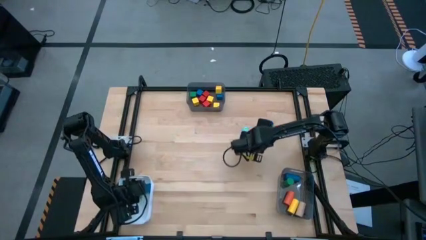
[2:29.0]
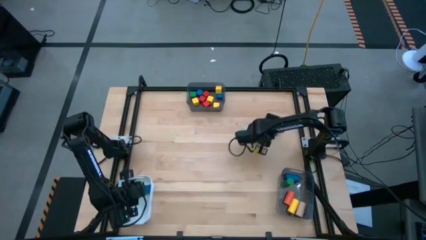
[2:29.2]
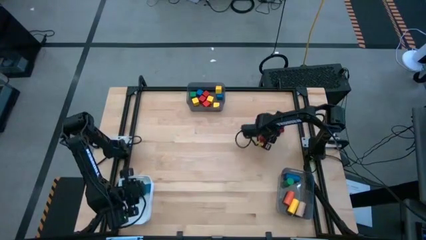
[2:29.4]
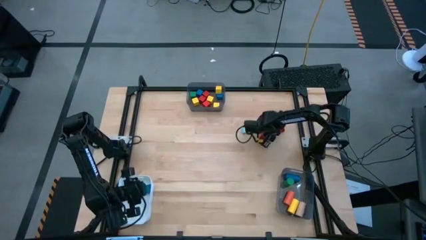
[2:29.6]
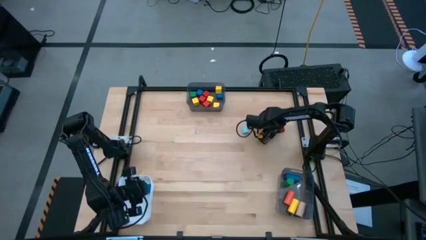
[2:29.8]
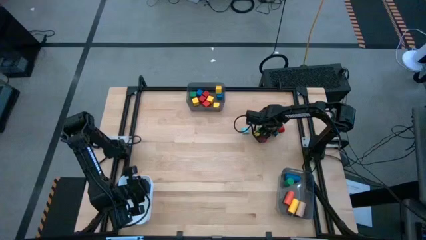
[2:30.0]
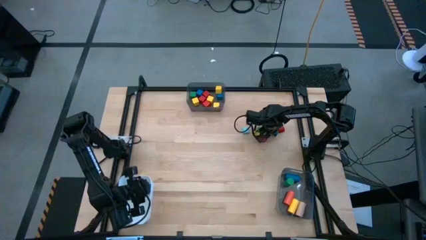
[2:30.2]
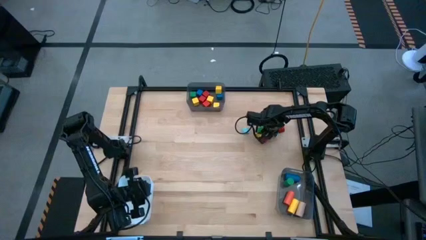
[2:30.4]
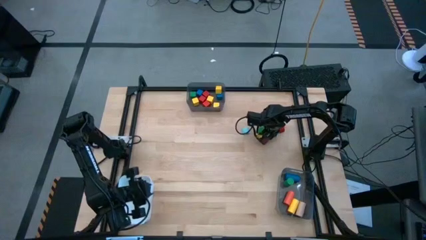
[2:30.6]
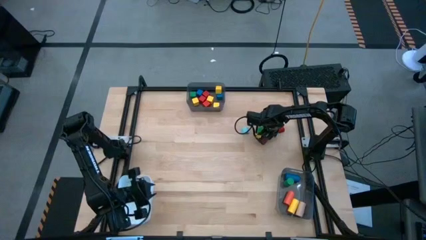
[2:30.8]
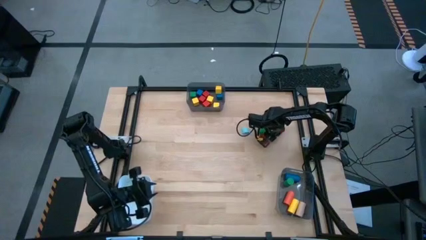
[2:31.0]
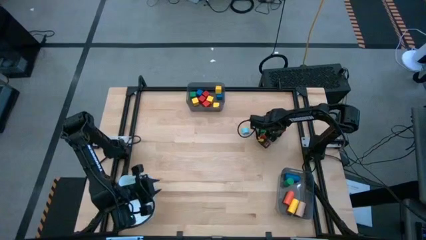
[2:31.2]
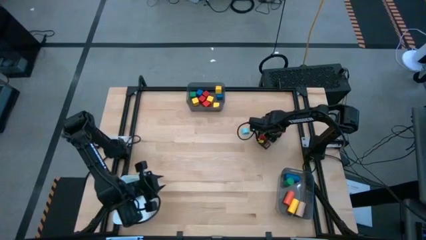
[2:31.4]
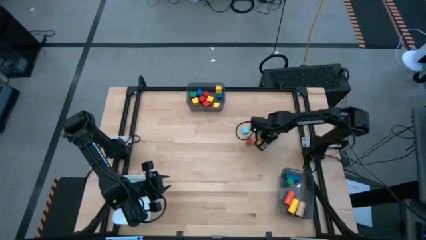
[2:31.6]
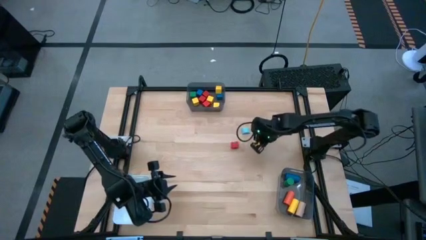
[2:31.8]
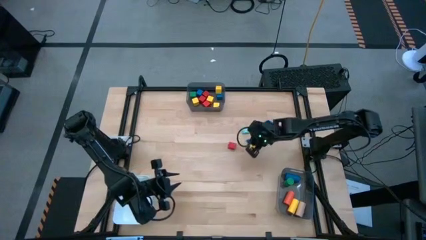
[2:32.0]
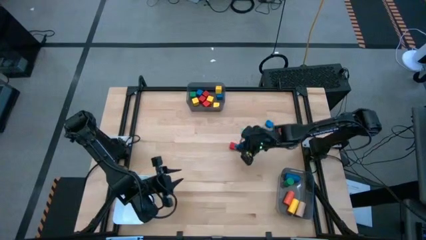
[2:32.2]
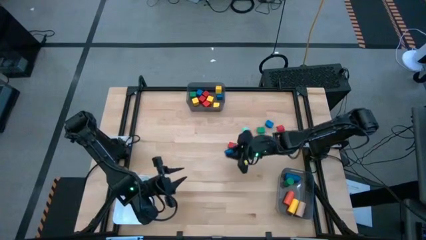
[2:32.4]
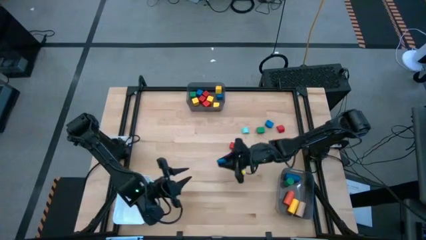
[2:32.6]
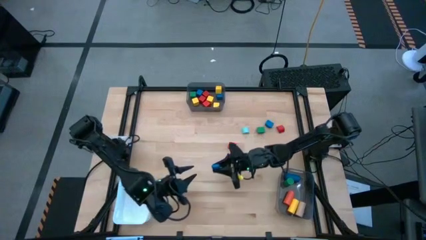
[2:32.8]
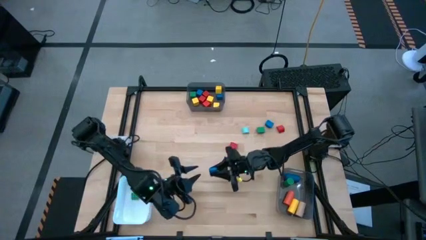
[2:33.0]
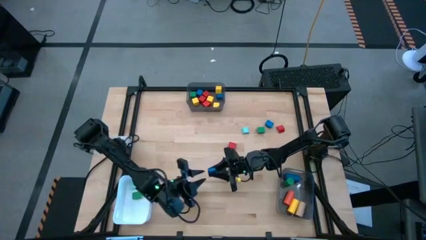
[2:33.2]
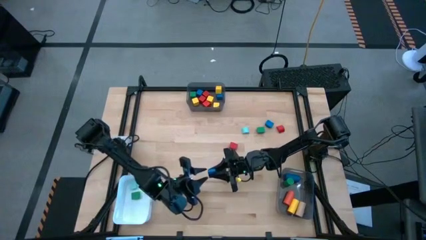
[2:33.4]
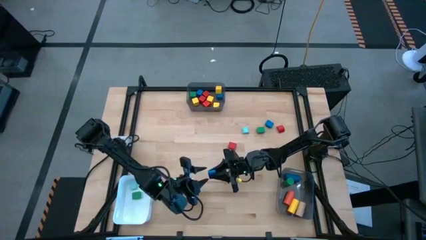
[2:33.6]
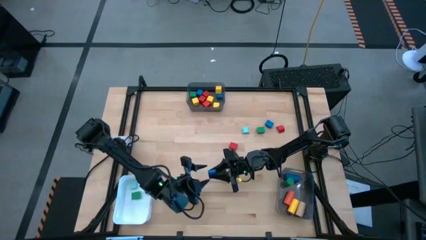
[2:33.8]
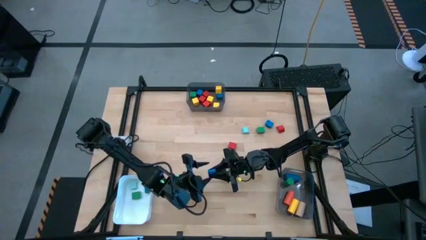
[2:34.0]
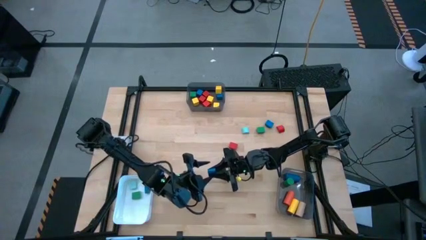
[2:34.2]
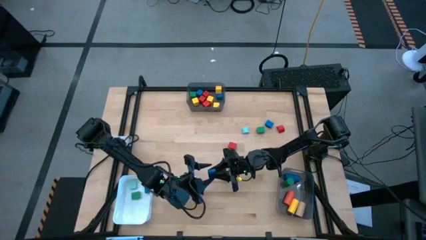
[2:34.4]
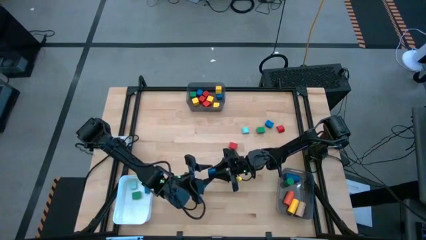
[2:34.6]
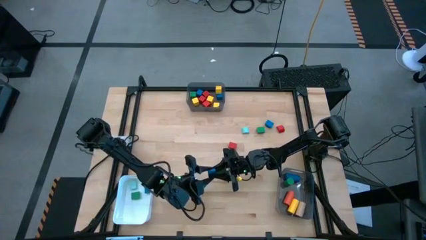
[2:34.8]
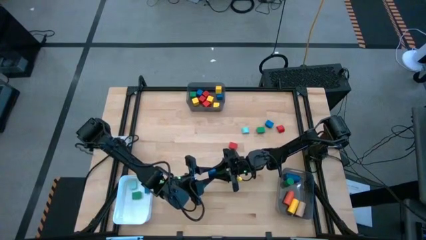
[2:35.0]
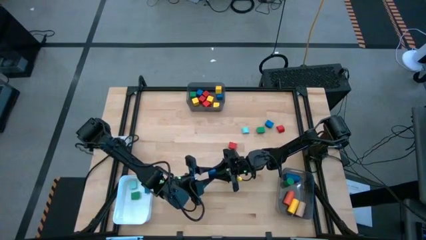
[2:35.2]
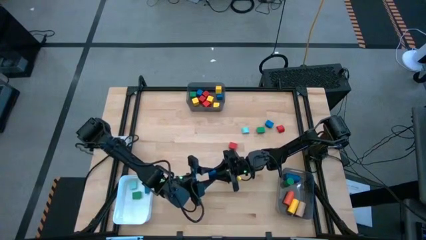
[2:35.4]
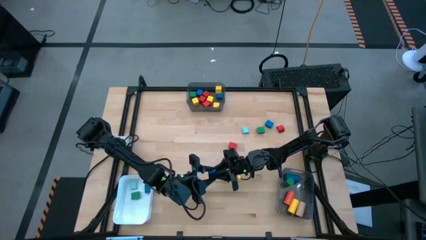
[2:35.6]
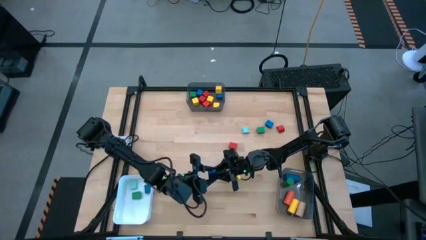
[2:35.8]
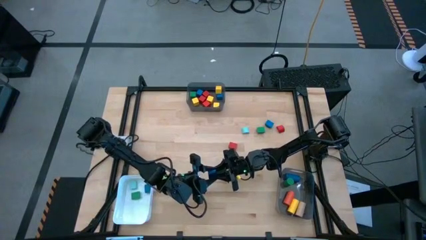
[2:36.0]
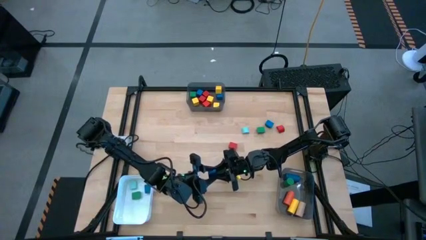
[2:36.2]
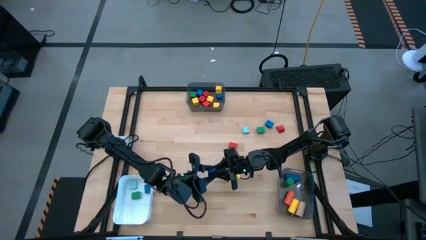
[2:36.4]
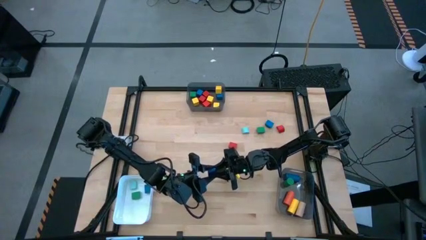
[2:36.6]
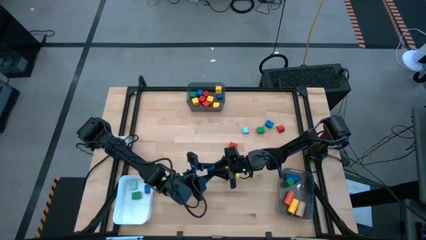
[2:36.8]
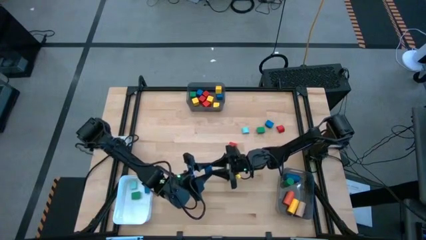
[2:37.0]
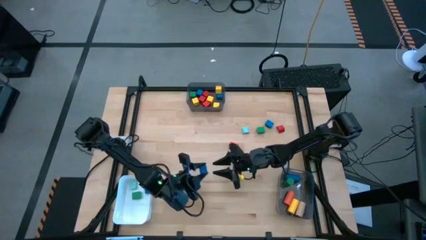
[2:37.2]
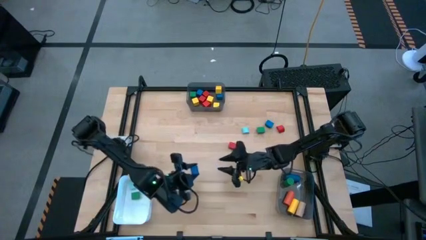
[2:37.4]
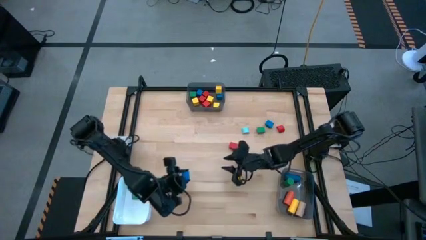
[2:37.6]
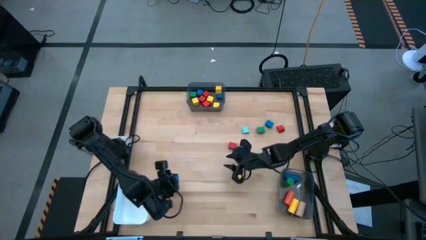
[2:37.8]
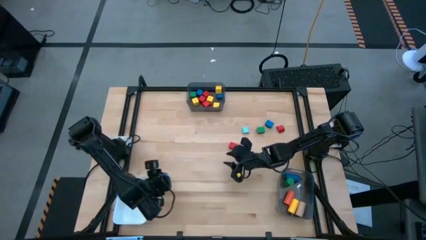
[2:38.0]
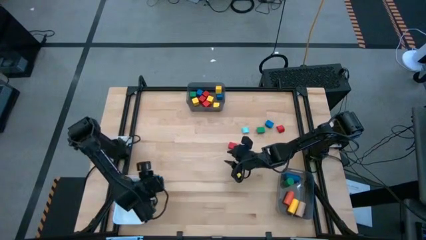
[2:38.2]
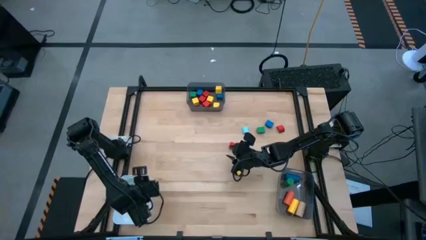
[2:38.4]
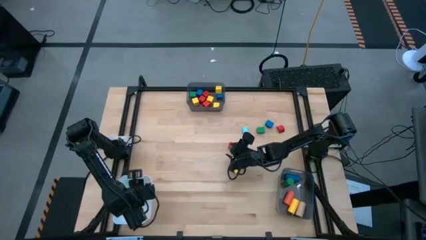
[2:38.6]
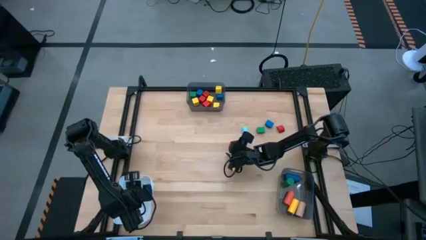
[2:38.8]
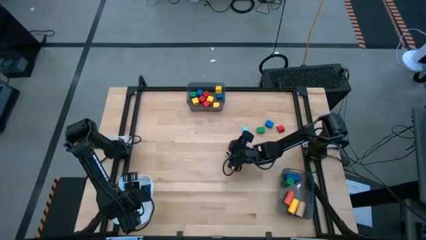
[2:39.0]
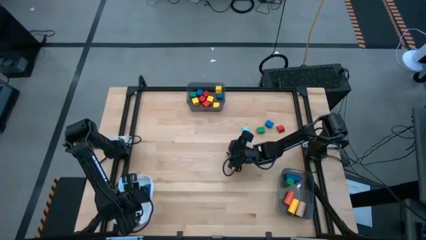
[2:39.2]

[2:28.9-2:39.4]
Task: Sort blocks by size
Put the blue half circle block into the white bin

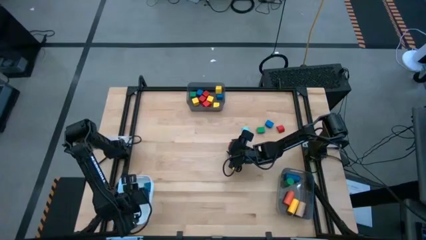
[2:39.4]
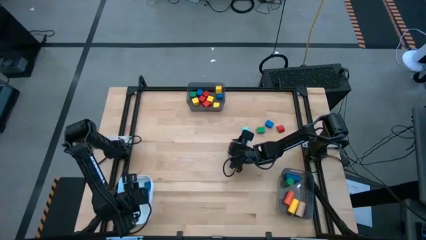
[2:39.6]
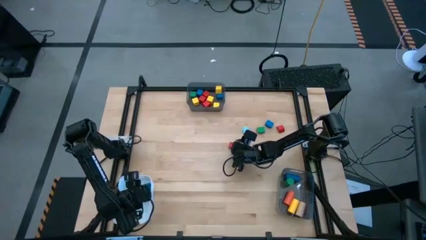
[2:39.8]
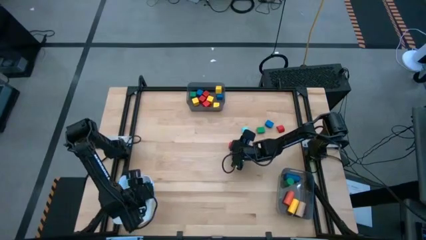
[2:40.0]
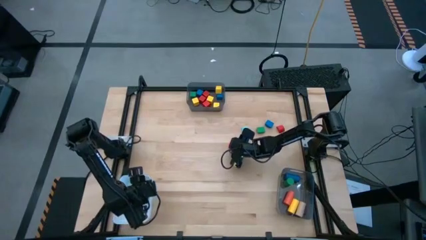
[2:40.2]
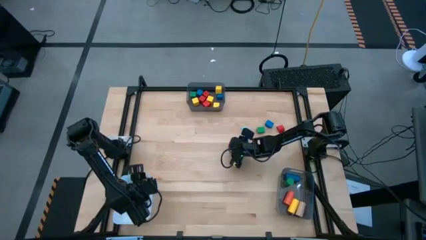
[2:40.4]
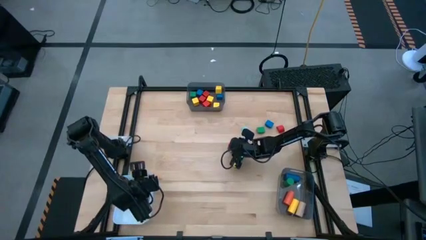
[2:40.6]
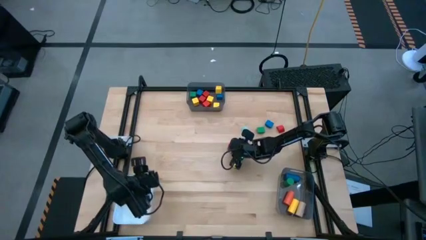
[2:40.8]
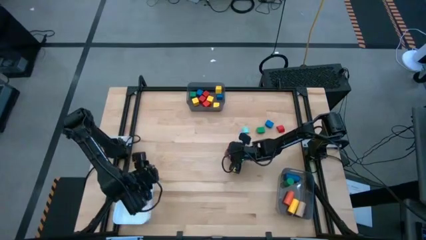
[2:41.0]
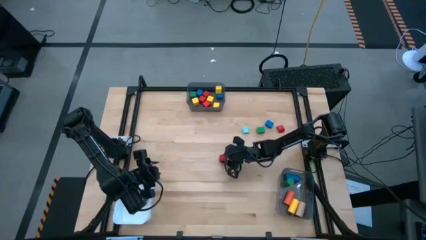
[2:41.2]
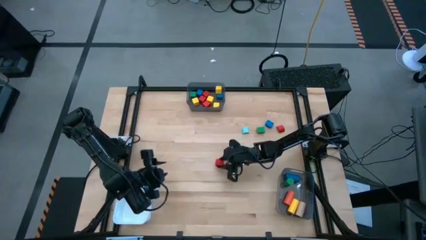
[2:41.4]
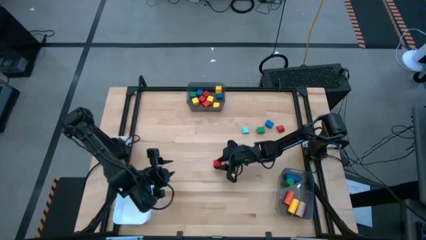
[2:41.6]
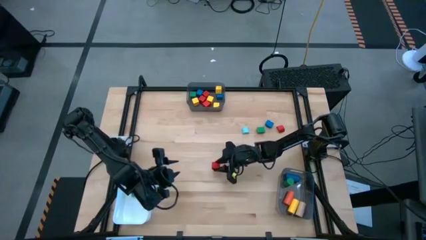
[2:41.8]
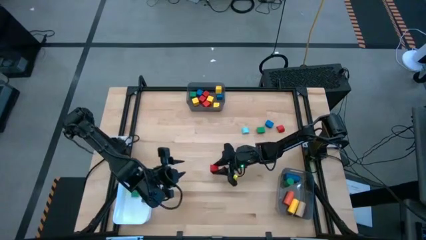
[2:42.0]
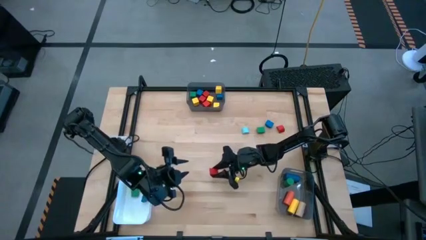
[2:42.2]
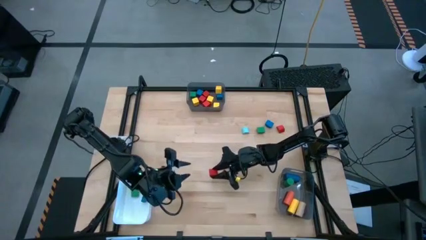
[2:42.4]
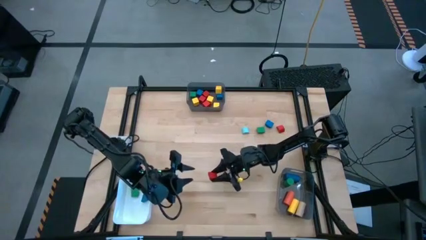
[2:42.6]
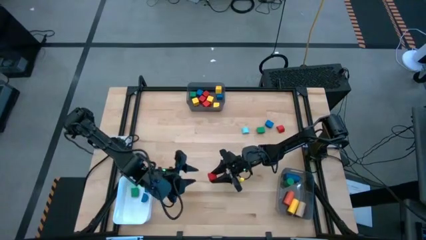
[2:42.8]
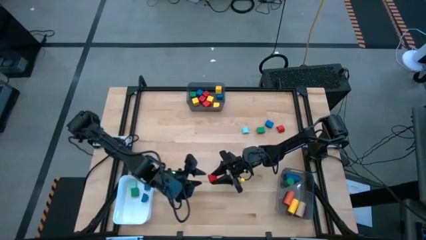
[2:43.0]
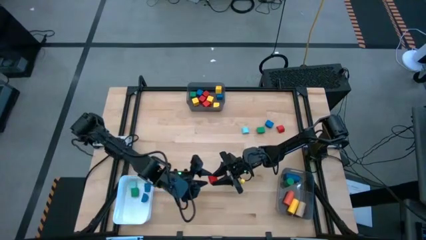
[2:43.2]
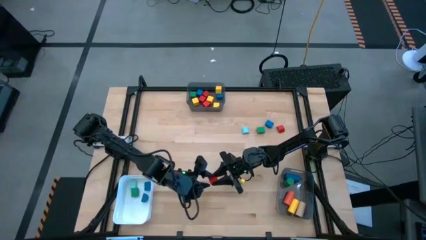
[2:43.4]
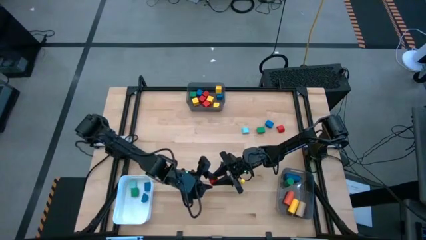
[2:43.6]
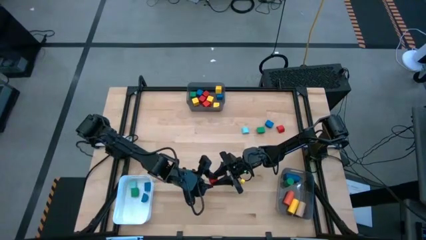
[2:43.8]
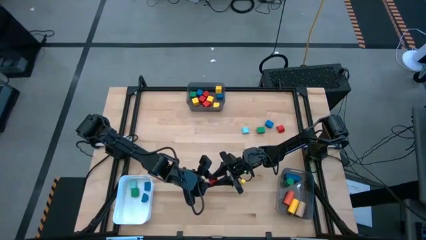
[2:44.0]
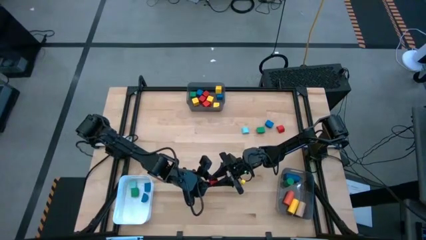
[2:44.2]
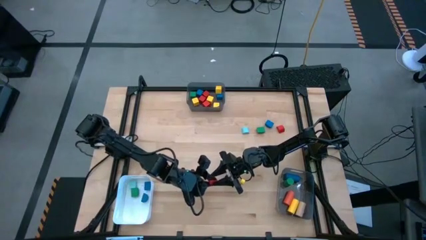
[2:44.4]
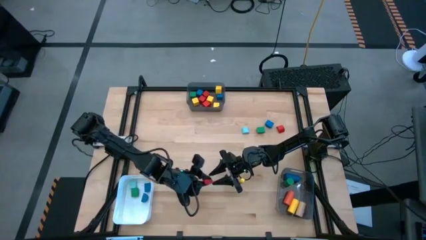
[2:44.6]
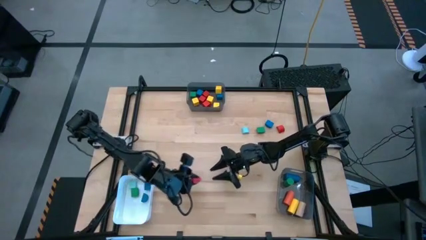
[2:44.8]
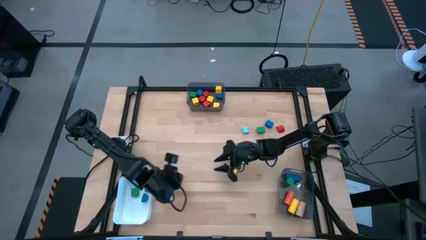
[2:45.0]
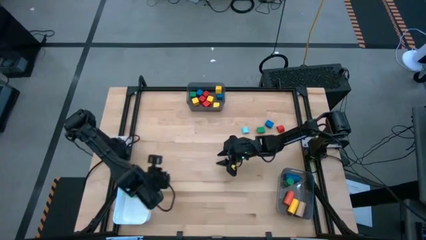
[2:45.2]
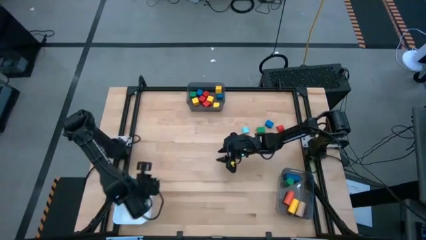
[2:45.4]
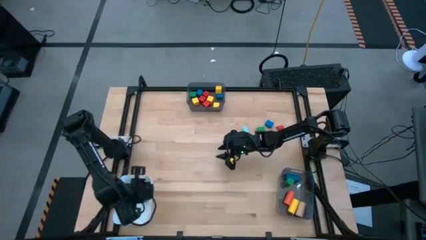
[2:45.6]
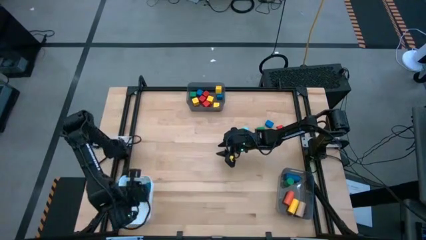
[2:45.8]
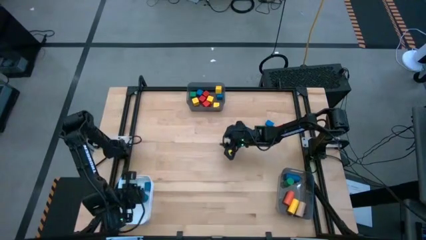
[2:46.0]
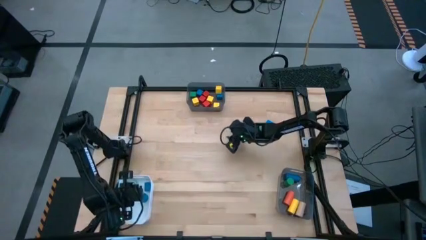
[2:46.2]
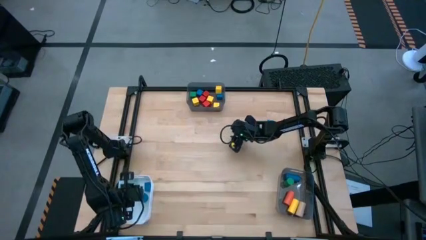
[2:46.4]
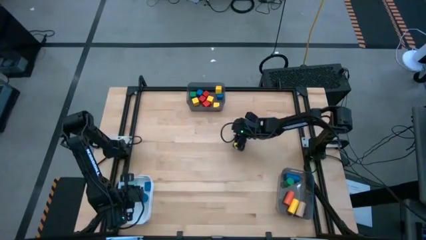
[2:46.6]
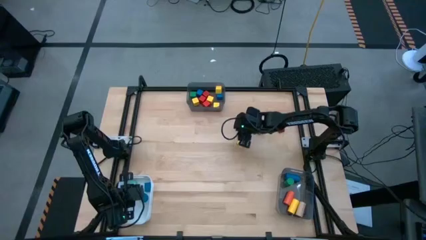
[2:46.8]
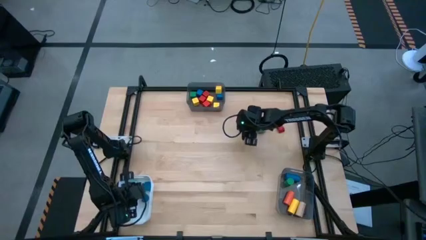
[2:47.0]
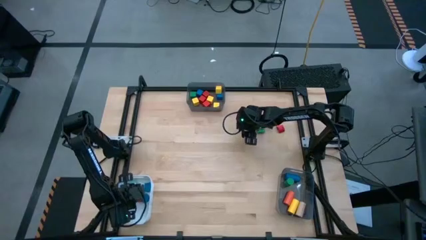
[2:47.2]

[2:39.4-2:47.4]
Put the red half circle block into the white bin
